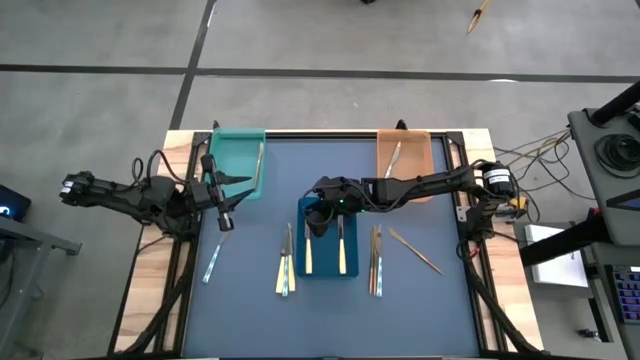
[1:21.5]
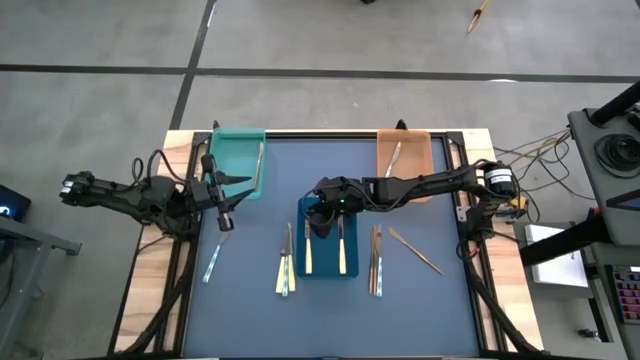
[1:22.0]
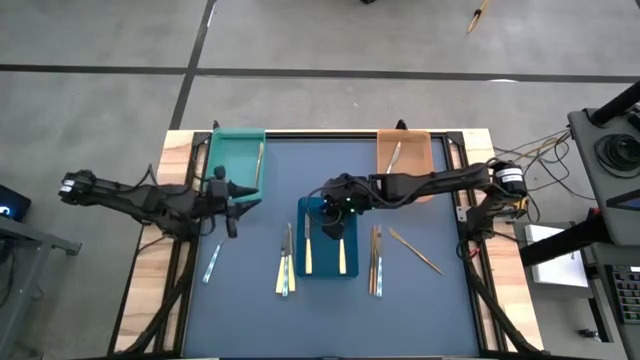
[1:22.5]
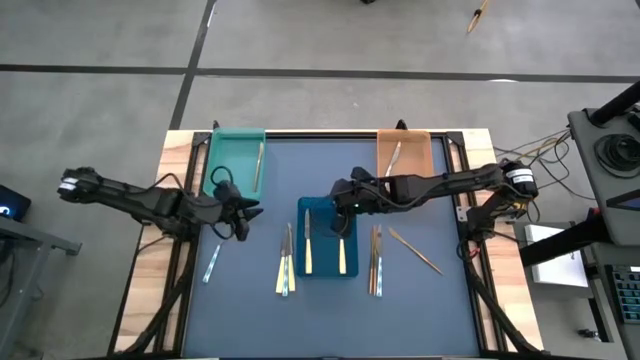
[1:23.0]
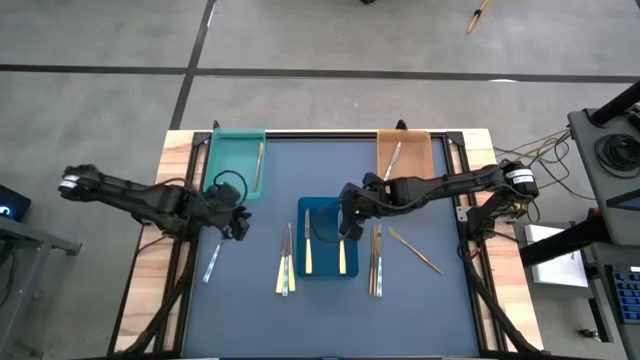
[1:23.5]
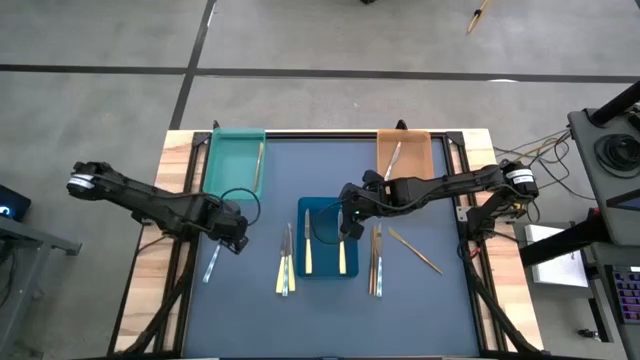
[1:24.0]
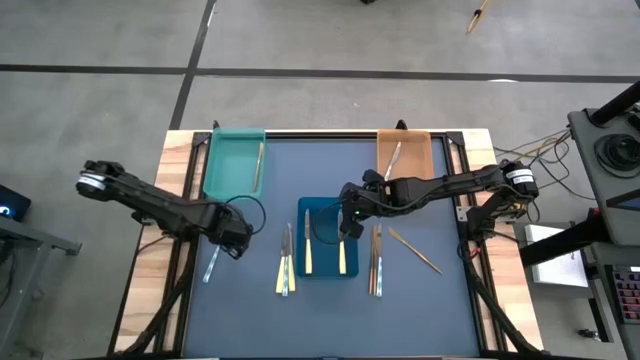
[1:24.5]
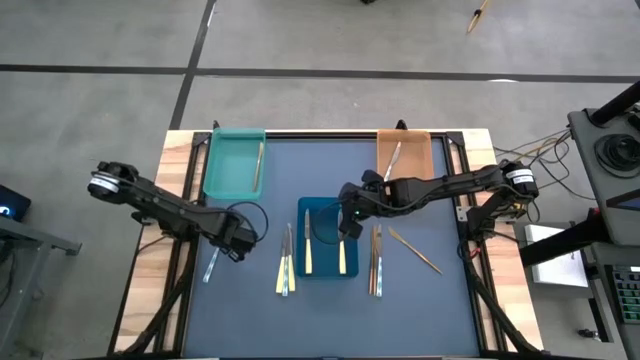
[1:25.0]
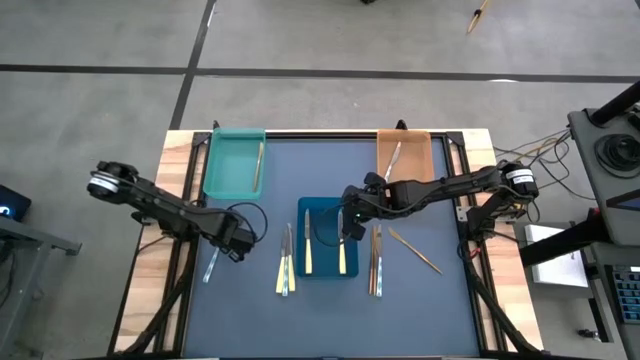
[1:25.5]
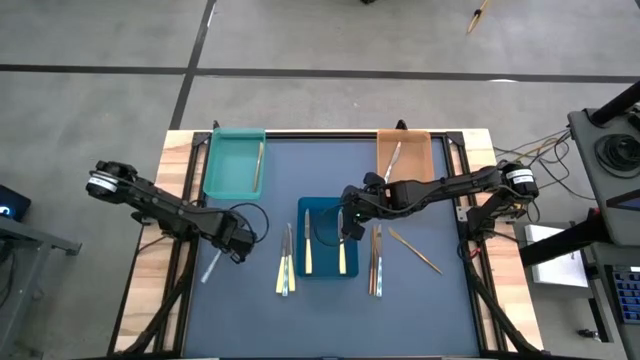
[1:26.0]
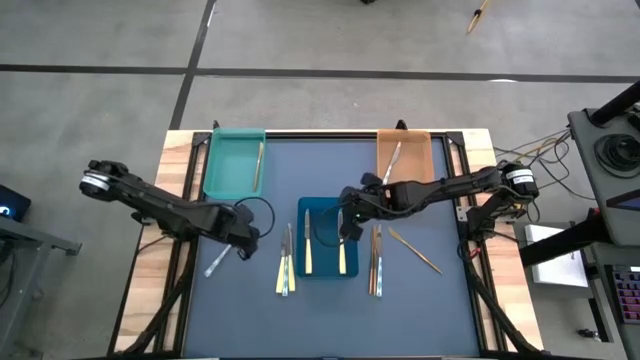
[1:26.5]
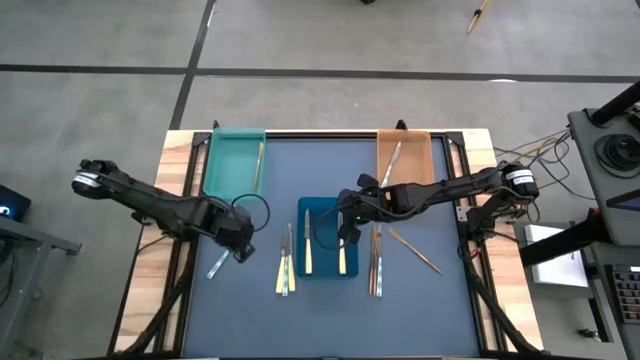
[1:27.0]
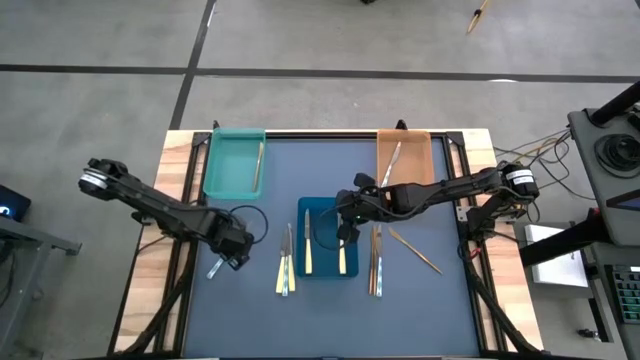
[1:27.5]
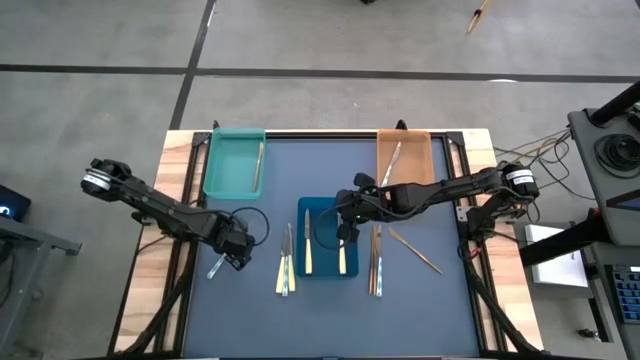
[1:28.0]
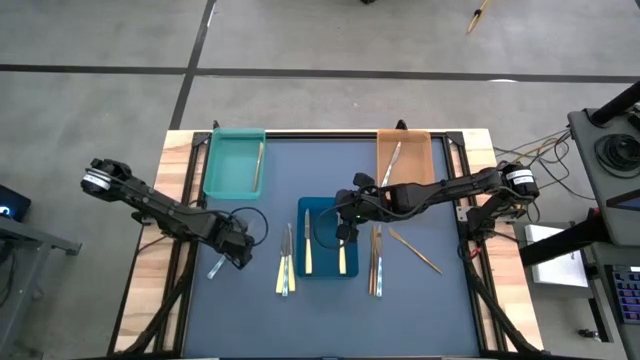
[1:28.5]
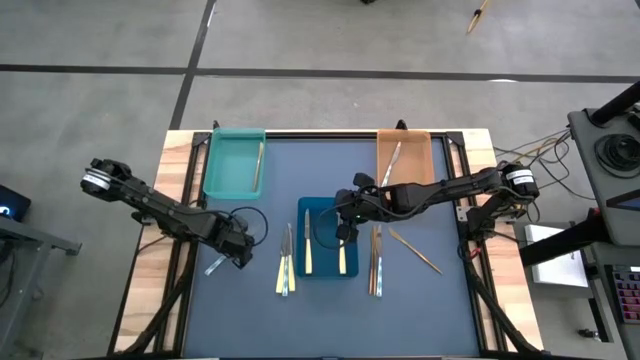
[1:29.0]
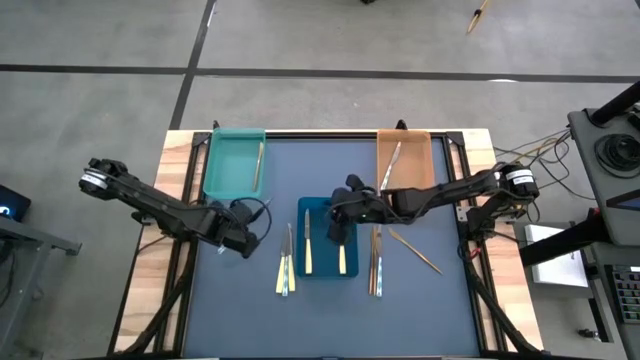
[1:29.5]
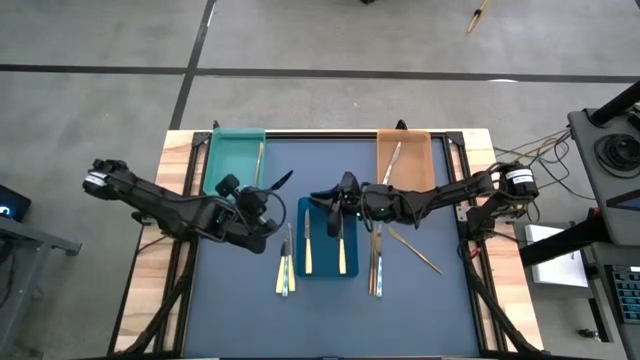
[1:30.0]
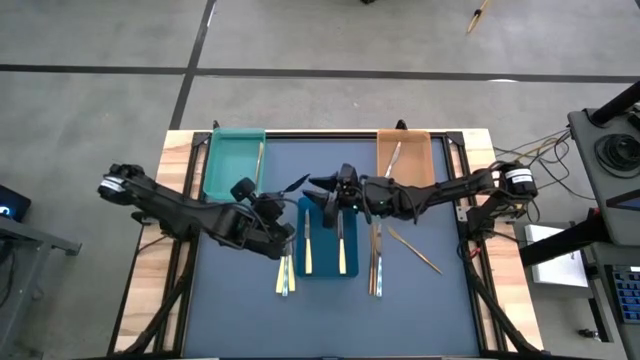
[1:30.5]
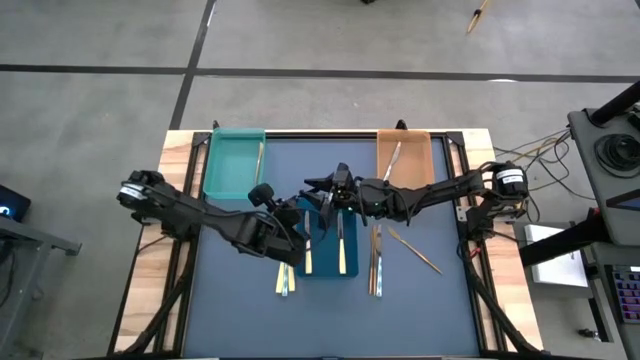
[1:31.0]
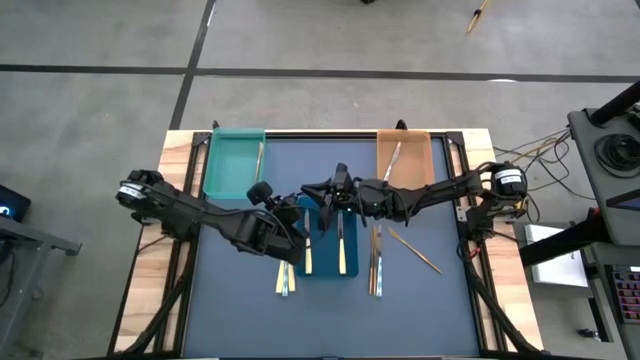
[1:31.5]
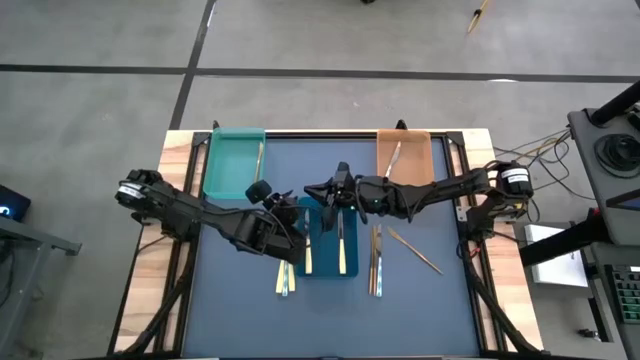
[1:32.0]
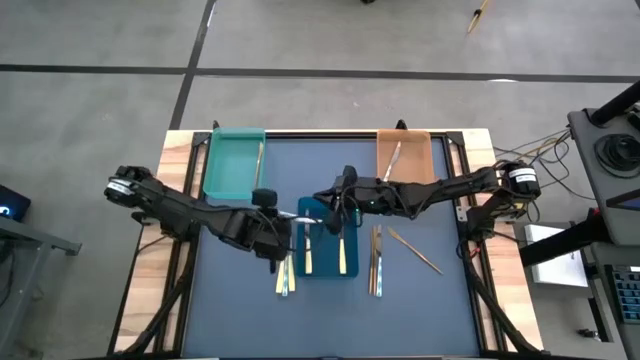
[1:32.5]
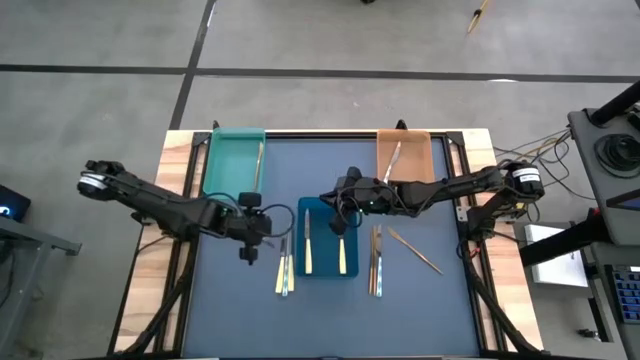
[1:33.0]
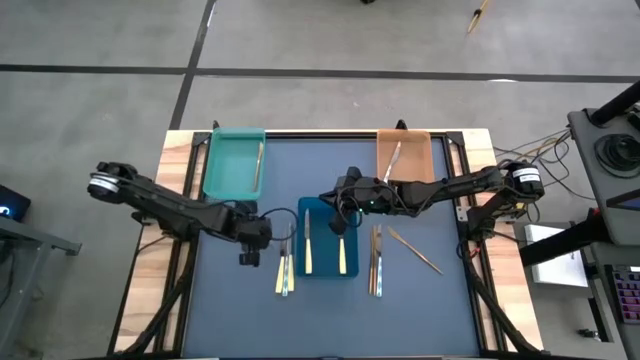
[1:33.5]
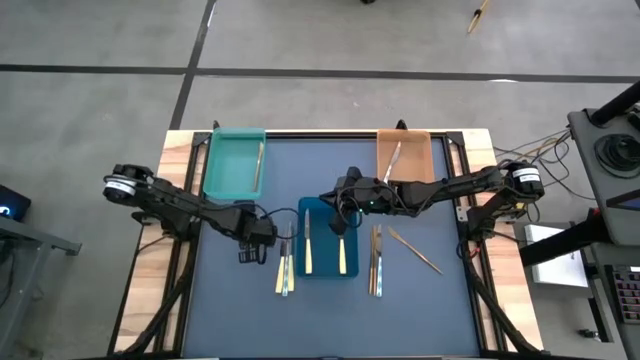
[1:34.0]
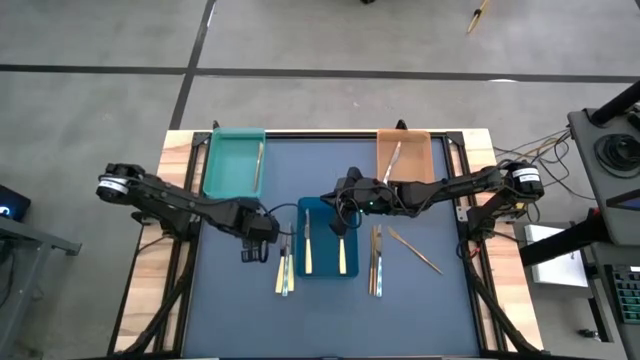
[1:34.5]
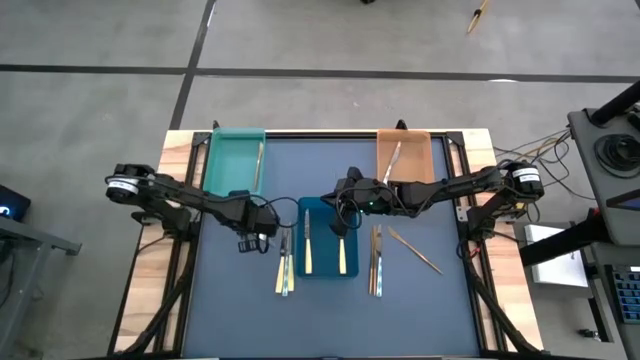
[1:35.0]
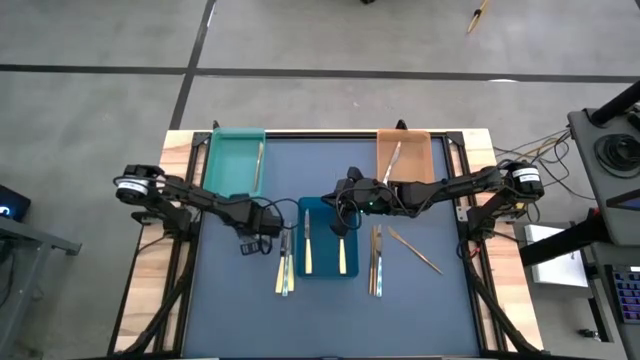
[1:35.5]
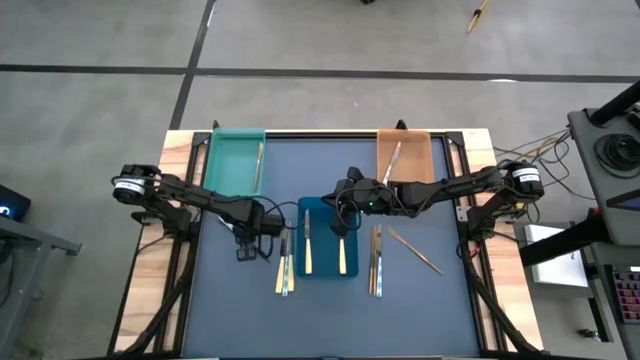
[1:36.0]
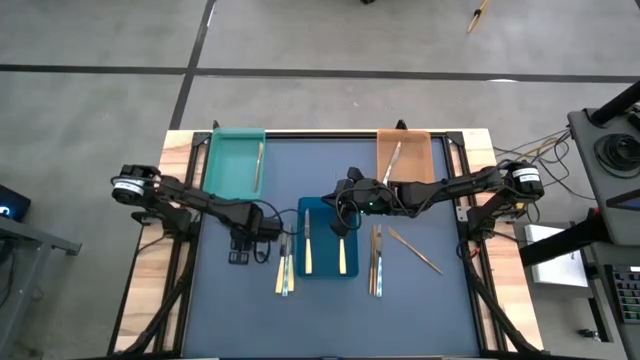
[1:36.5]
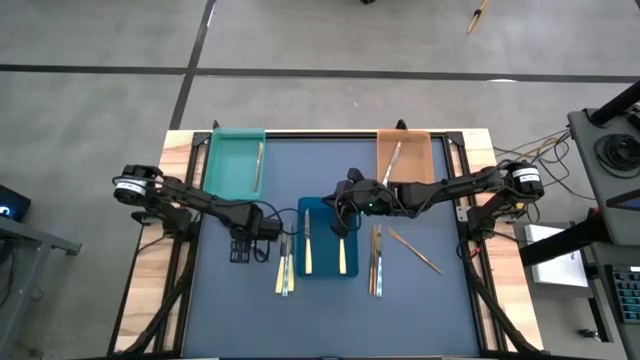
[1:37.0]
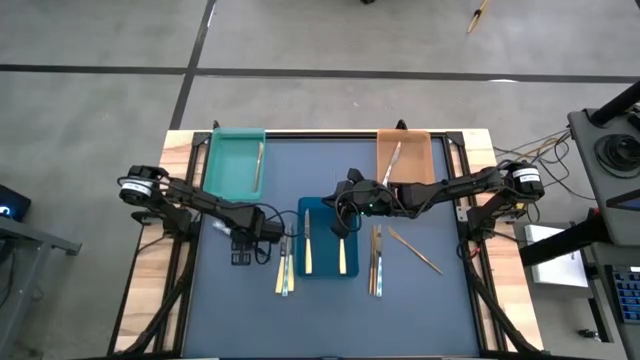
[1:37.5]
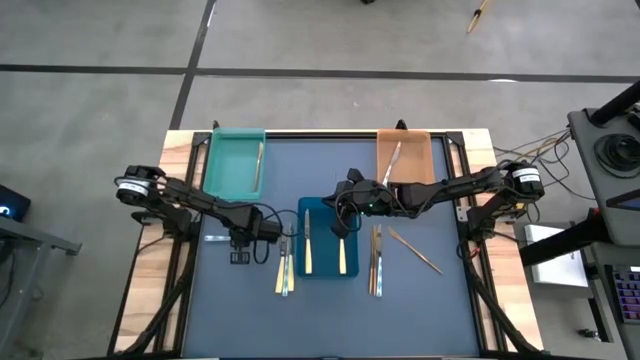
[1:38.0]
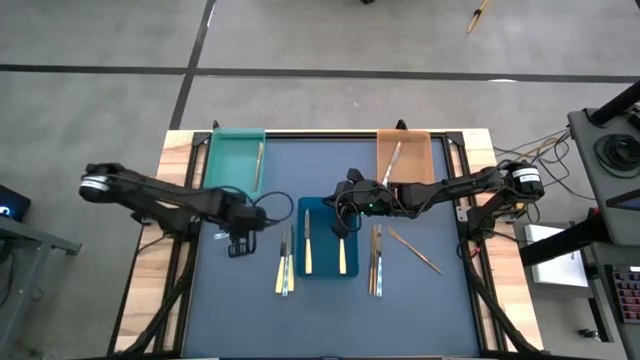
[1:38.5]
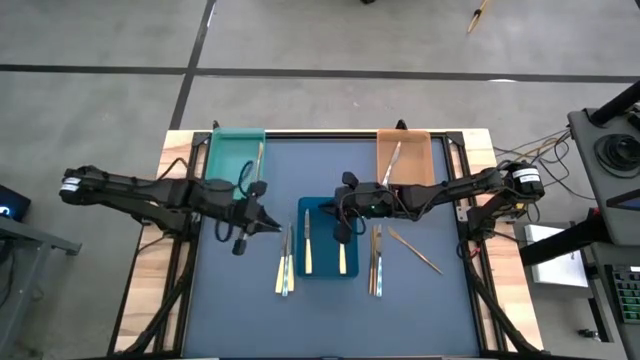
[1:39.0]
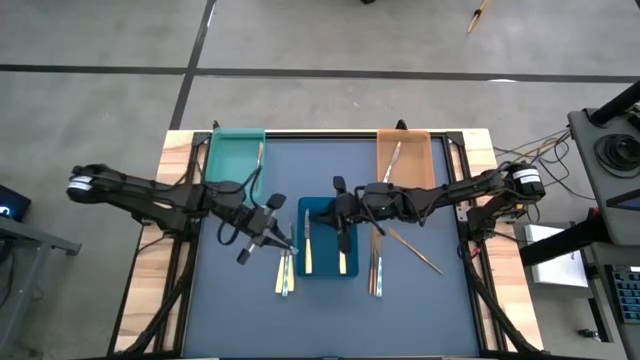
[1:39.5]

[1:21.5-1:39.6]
Task: Sort silverware by color (type)
Put the left blue and white knife into the orange bin

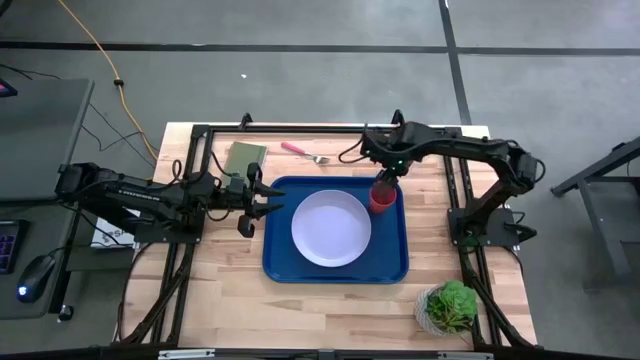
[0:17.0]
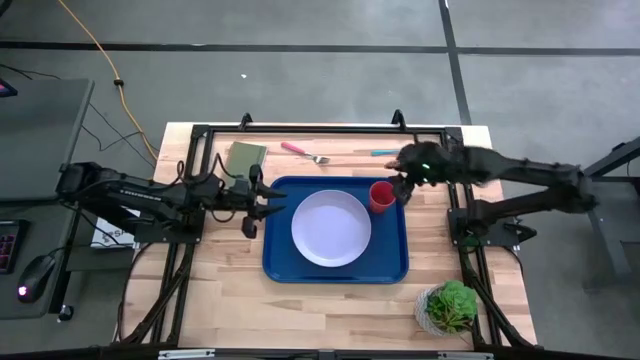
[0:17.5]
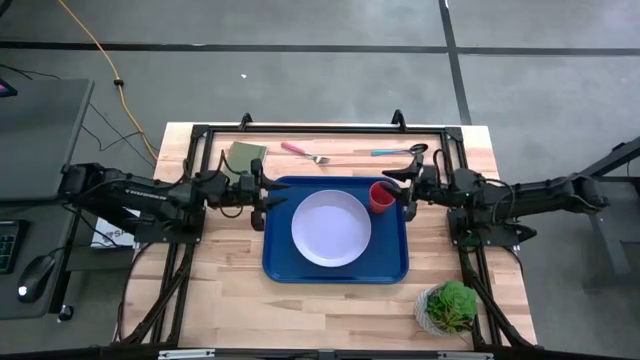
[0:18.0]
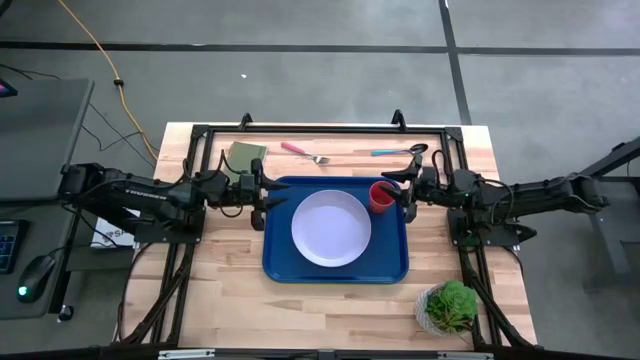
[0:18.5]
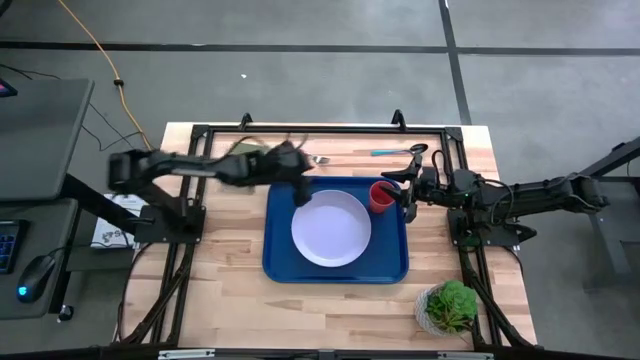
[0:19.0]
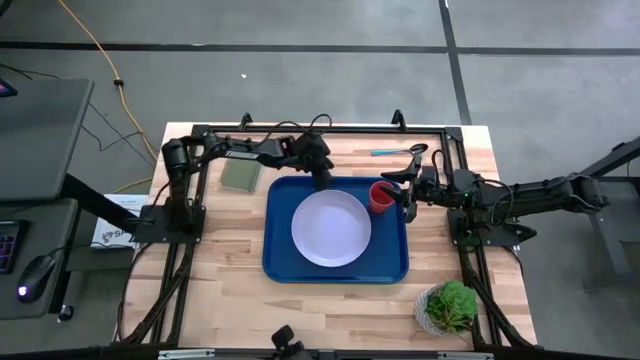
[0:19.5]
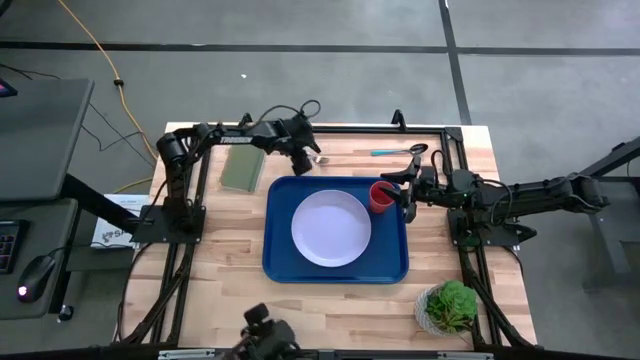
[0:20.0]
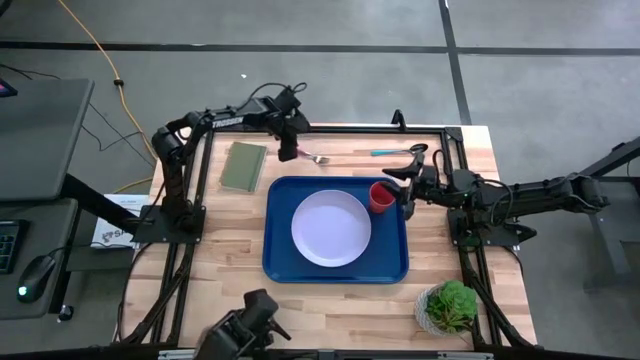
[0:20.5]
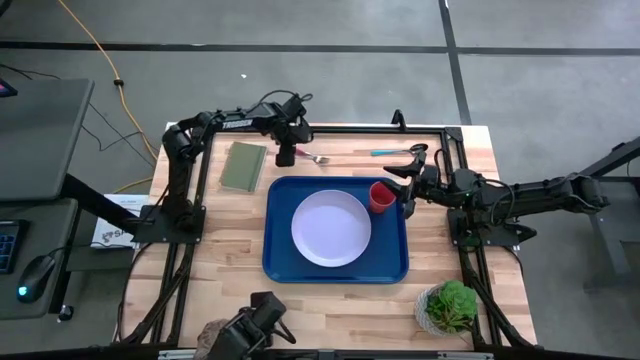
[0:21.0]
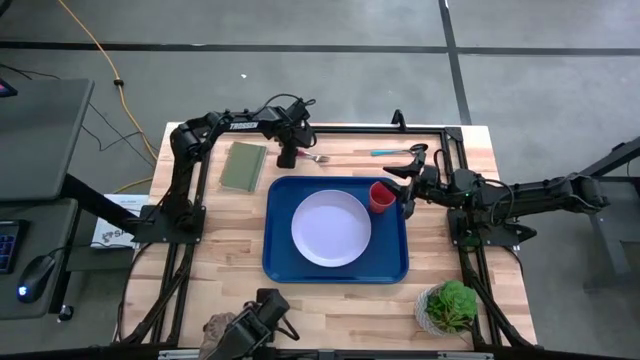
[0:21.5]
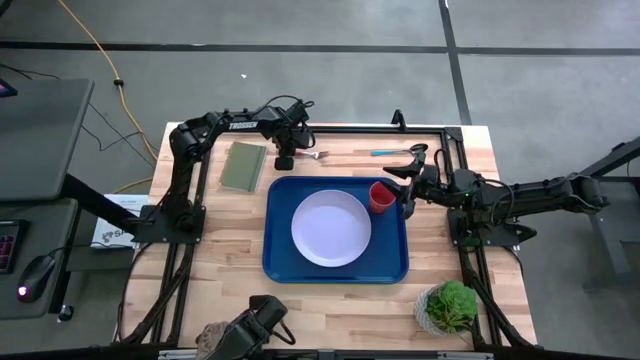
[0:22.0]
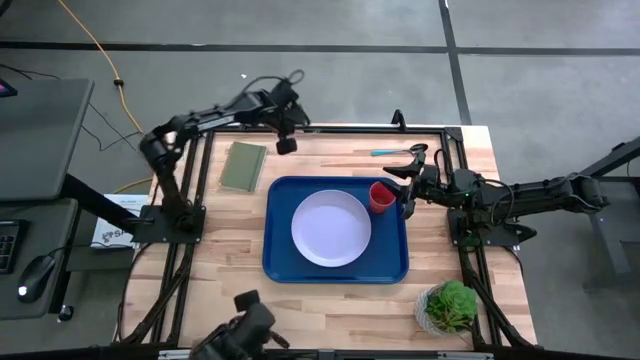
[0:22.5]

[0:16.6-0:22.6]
Task: Pick and place plate/cup/fork/spoon on tray
Put the red fork on the blue serving tray to the left of the purple plate
